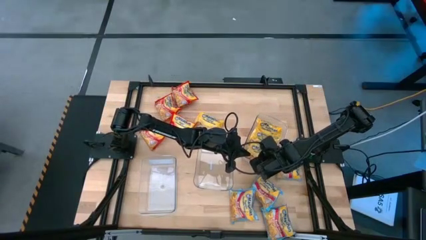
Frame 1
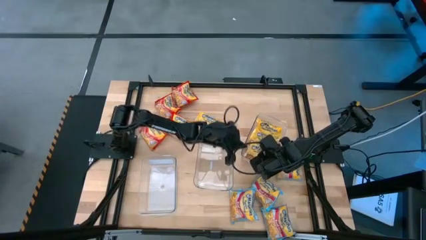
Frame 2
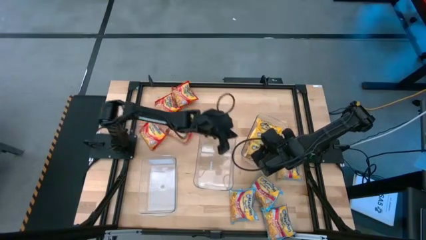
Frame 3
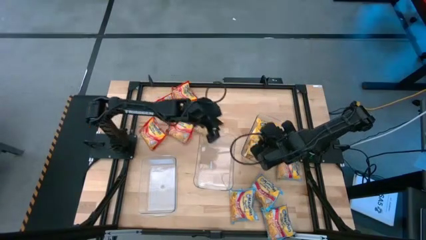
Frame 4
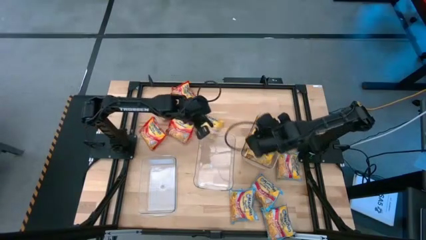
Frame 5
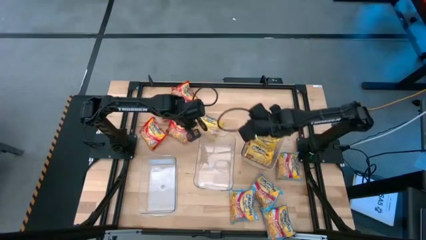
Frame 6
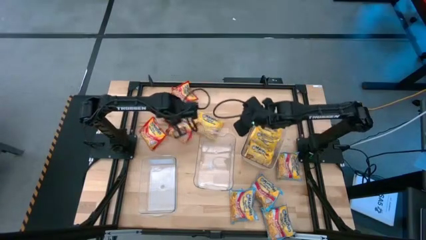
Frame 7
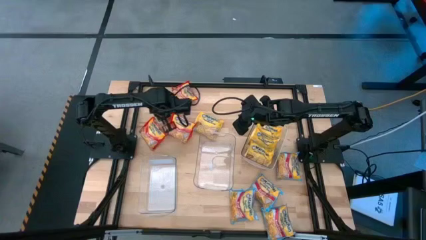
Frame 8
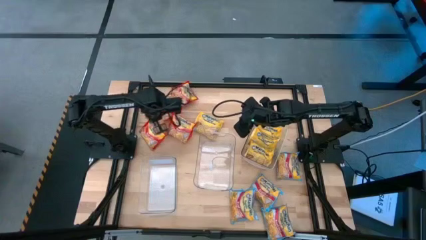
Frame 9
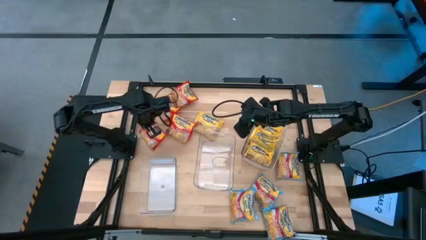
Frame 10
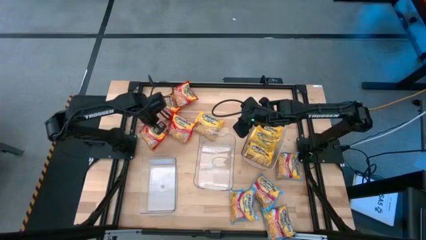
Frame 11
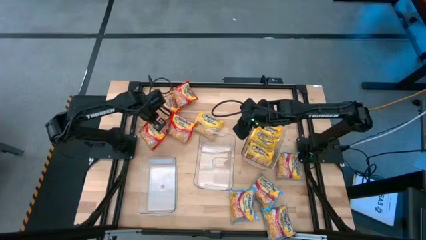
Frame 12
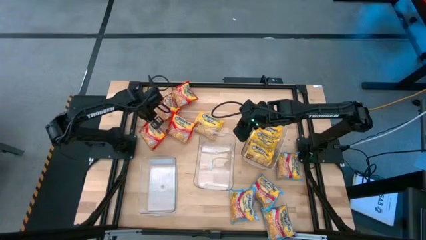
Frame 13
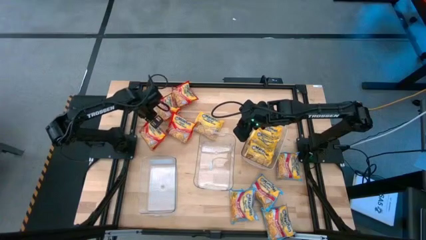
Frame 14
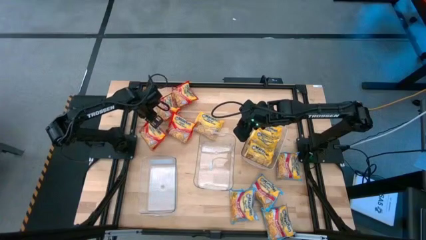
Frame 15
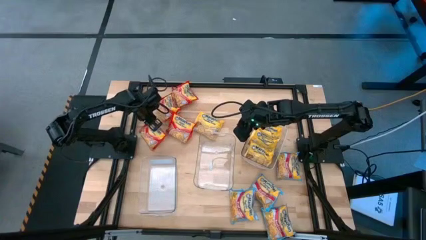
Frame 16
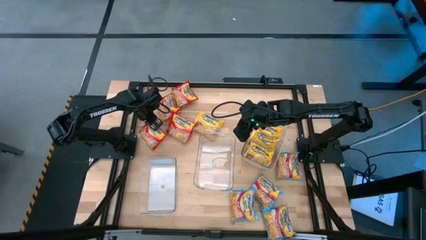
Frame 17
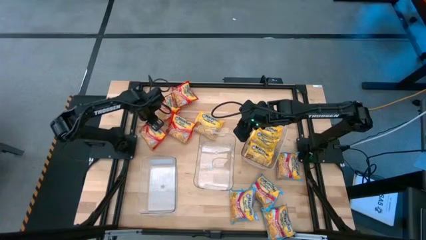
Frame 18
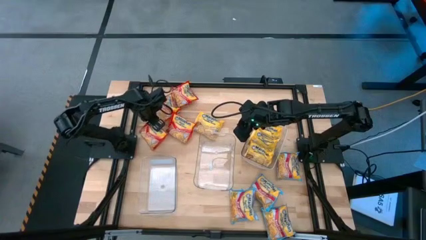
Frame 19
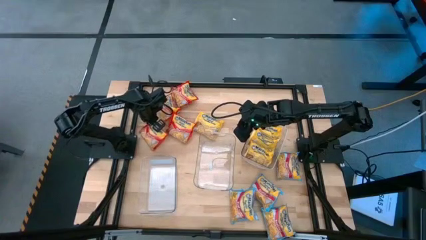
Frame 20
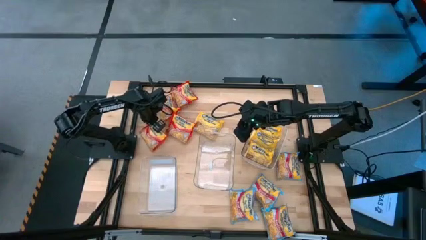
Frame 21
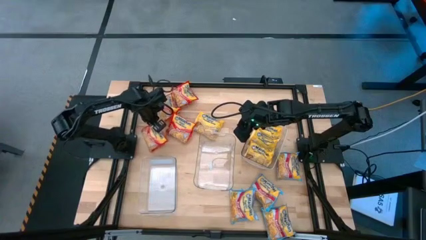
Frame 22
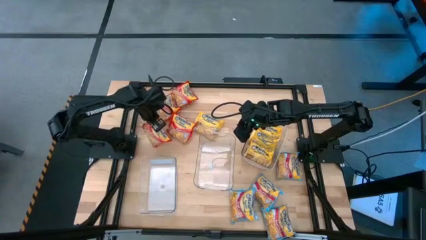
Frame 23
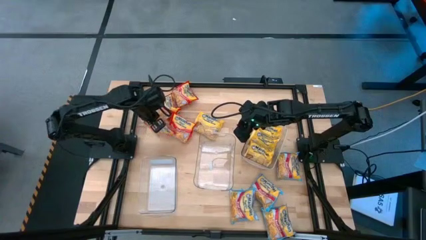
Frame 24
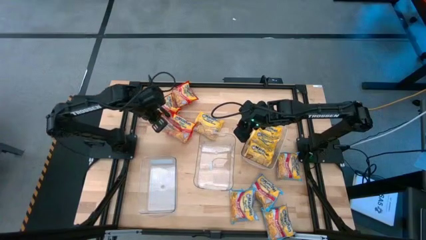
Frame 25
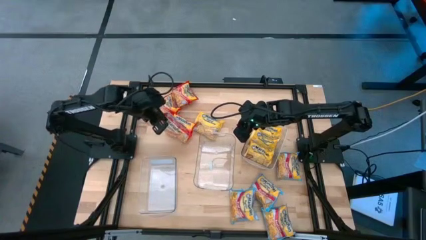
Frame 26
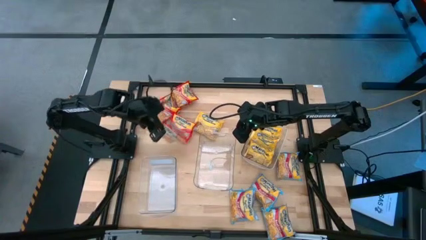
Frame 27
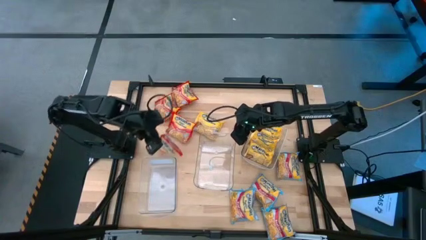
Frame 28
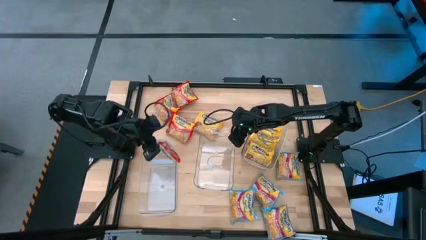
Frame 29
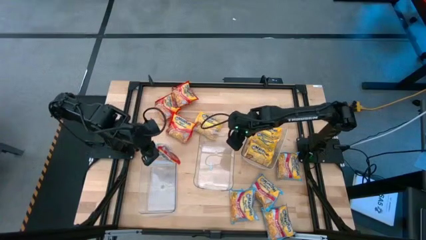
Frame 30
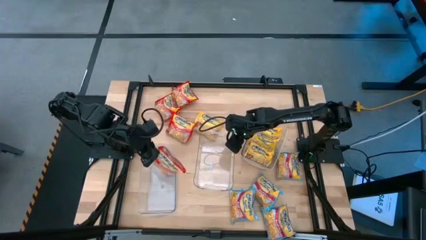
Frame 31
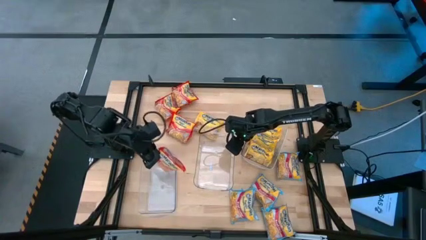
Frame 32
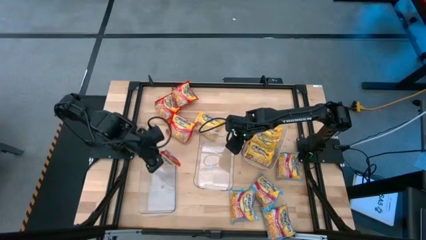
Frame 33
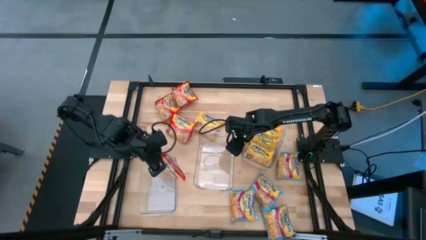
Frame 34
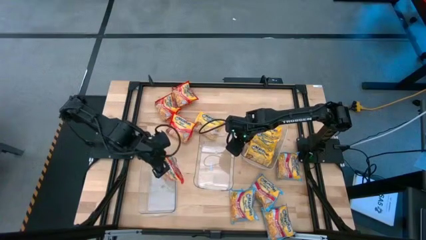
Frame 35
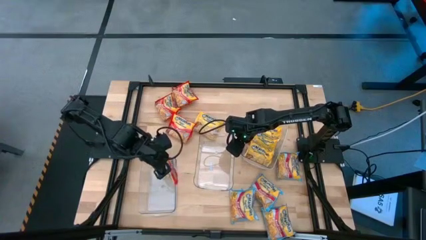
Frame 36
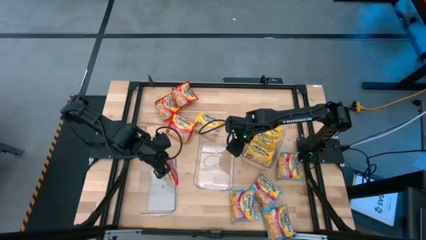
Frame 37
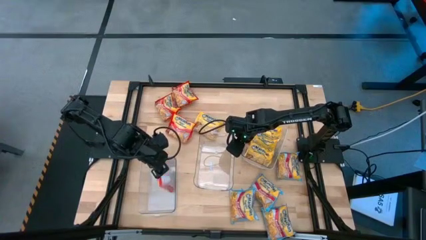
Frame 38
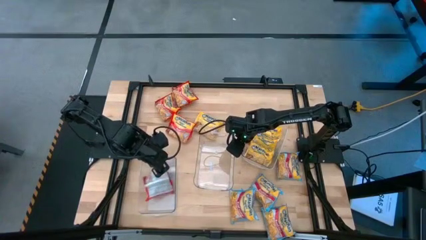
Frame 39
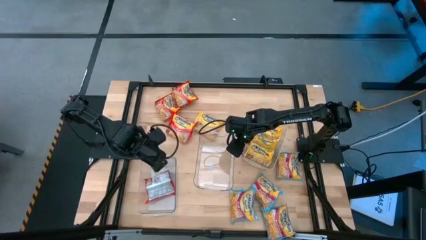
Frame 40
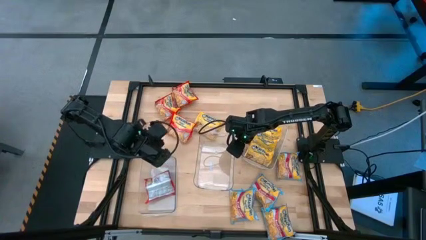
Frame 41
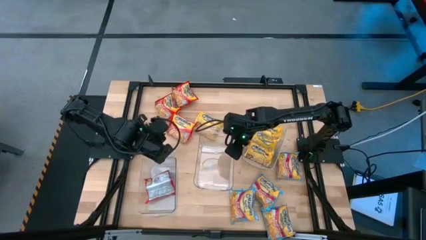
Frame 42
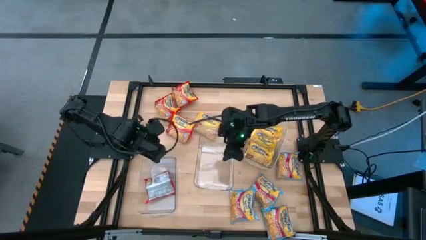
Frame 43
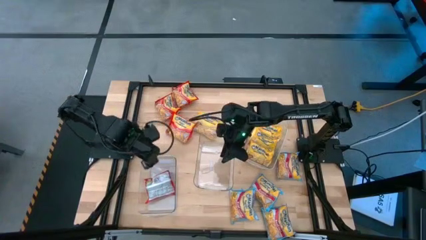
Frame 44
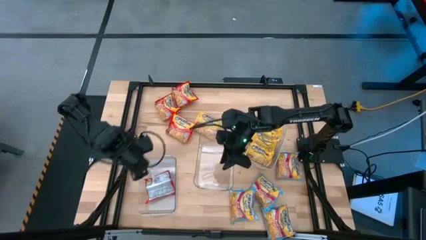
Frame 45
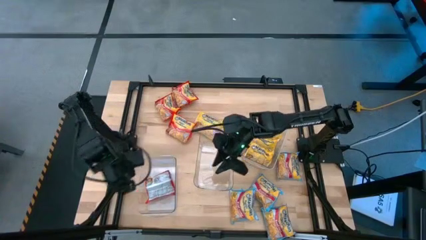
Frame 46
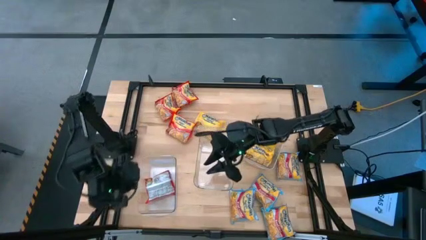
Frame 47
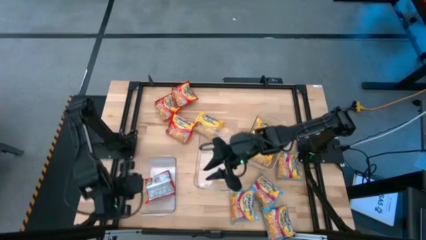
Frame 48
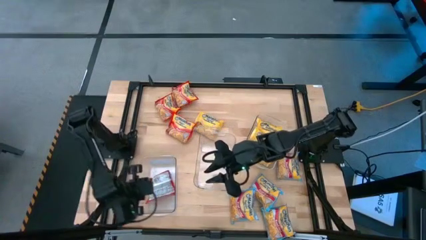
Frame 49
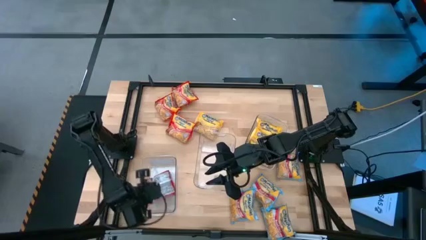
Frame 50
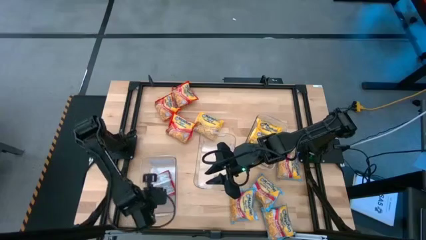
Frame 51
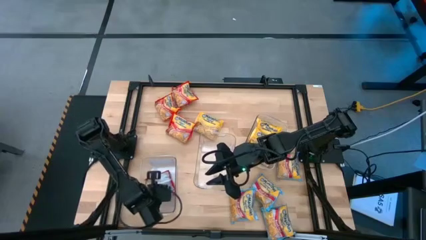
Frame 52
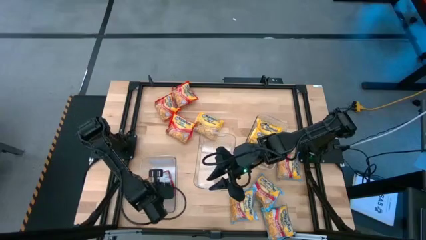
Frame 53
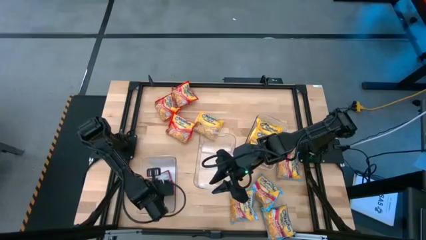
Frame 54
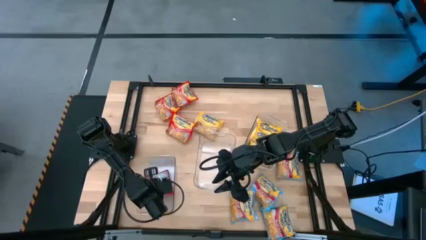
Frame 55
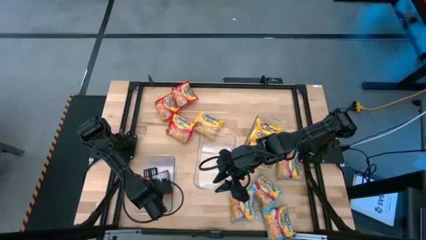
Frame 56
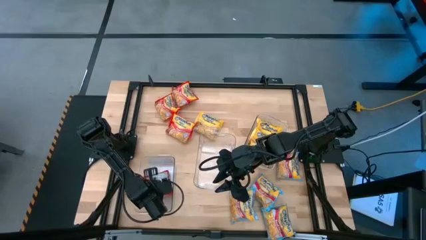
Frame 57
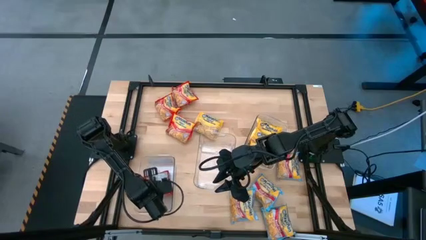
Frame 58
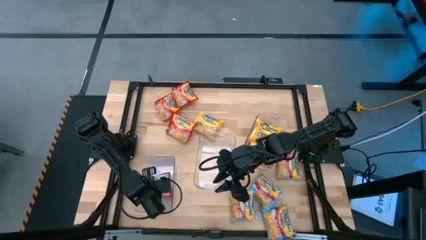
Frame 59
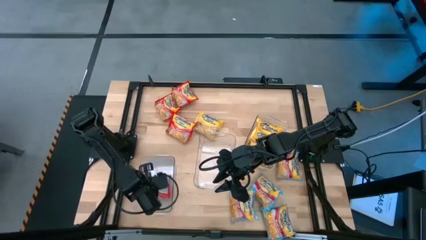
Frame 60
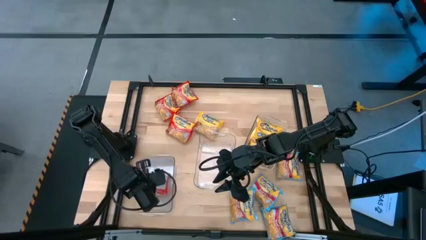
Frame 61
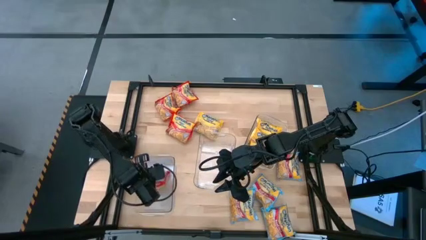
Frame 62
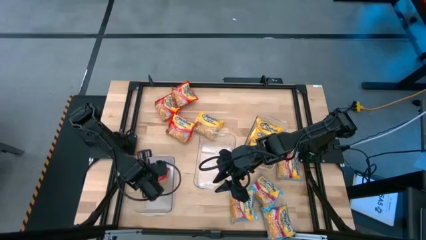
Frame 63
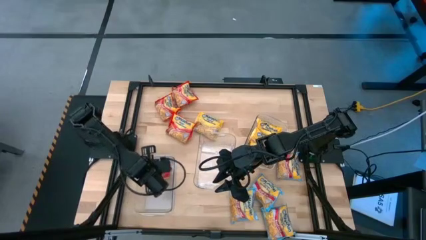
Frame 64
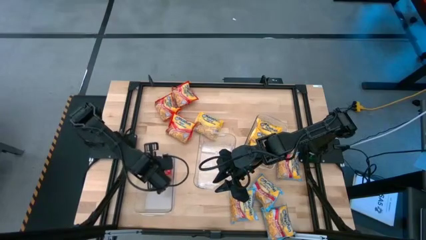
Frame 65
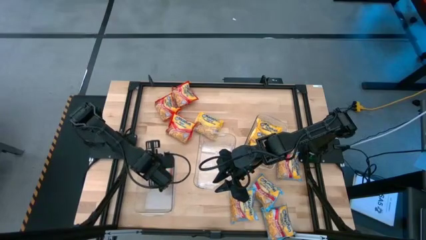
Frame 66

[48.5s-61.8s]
Task: Sort Maruchan noodles
Put the red noodle pack into the left transparent bin

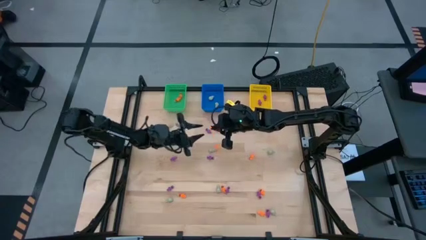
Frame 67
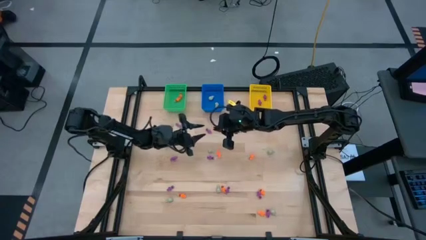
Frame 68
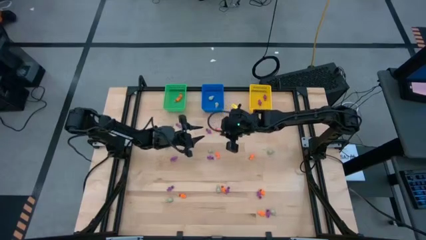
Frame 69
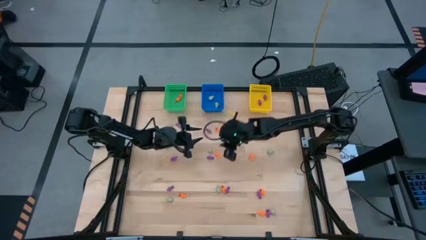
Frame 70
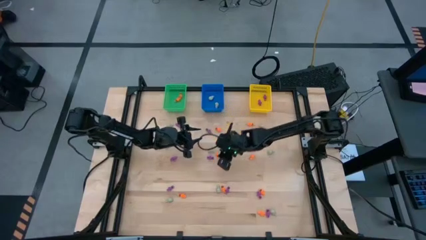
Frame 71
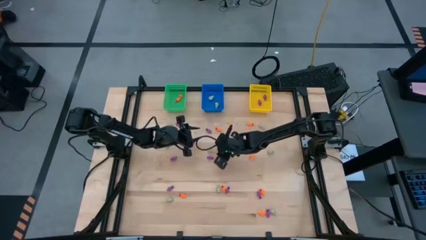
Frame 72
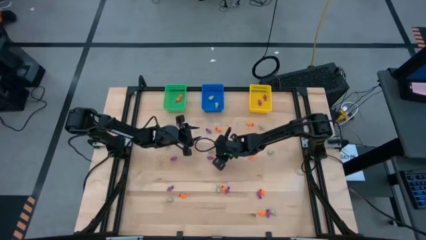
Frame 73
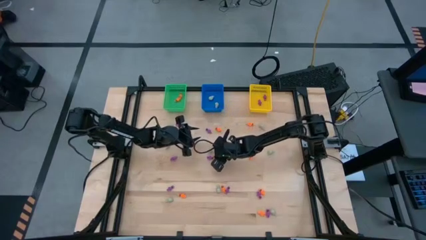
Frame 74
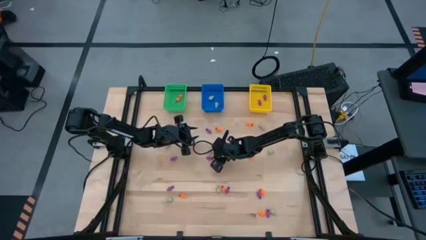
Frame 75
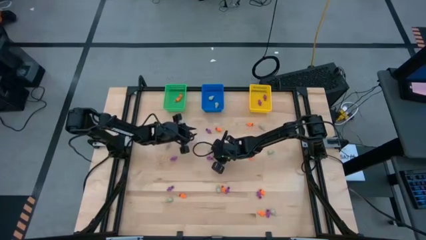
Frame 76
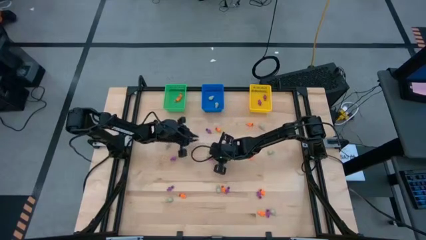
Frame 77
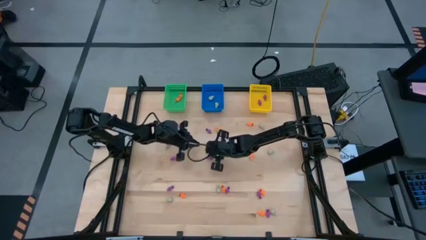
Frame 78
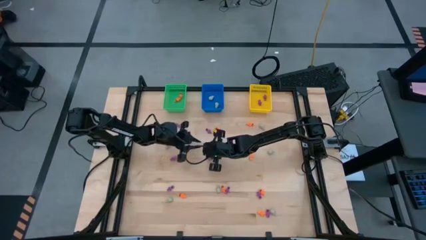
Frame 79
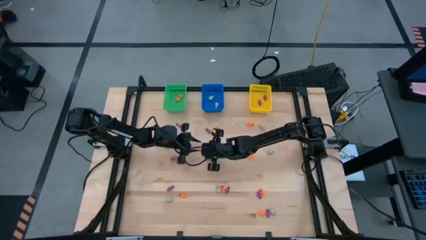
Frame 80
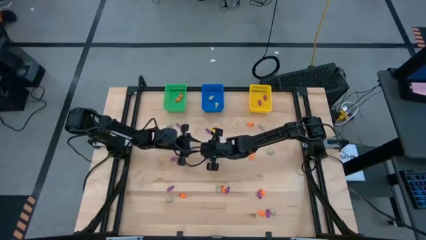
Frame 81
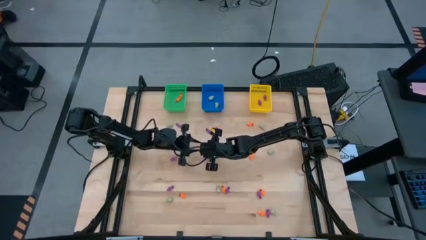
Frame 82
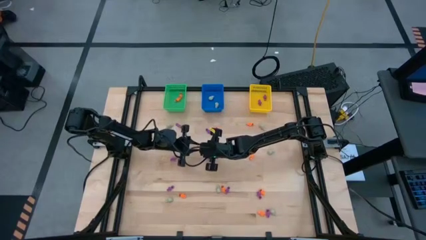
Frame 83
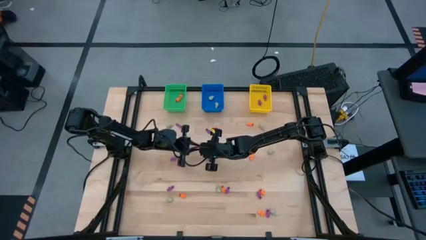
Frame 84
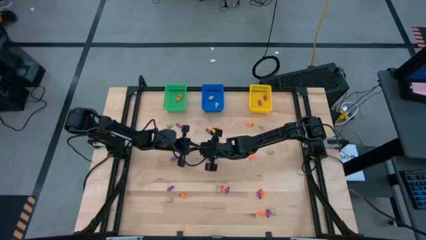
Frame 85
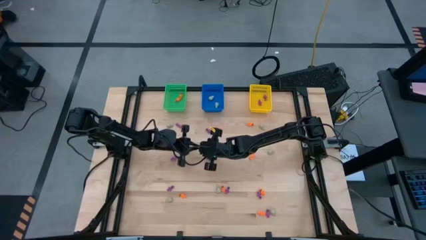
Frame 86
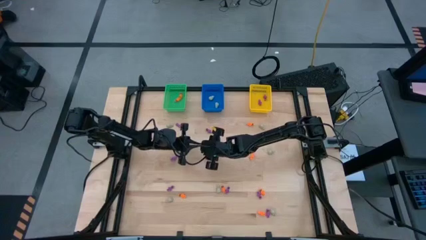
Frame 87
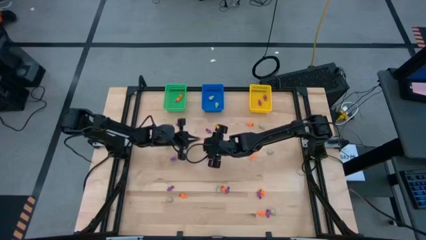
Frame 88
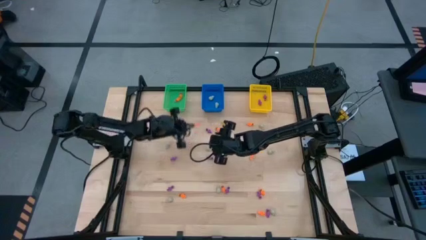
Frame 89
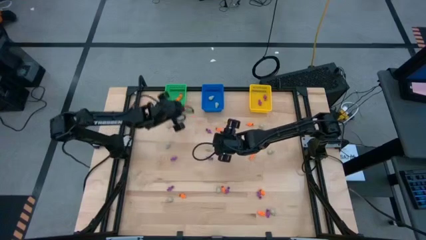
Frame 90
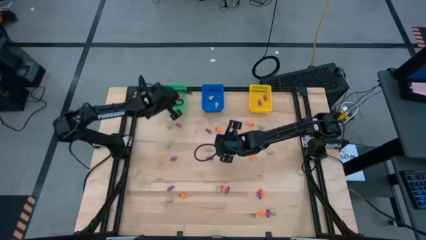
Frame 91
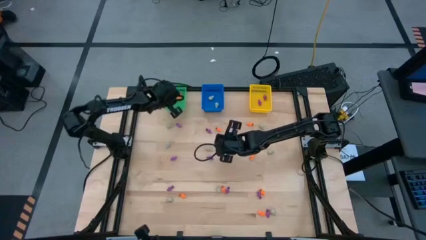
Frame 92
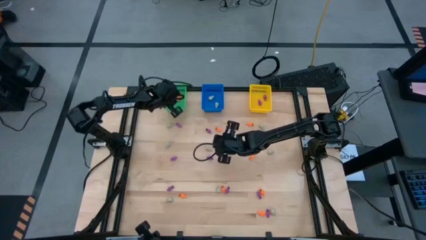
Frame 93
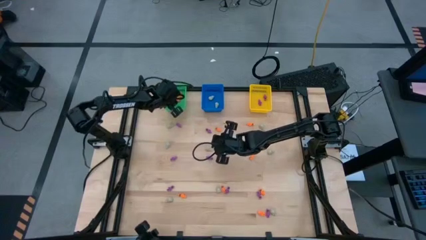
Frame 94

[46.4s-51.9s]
Task: Sort Halloween decoration
Put the orange skeleton toy into the green bin
